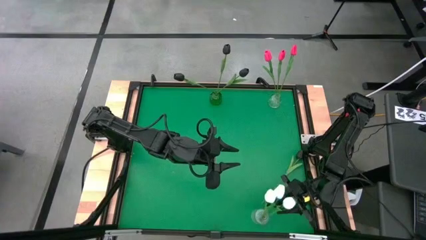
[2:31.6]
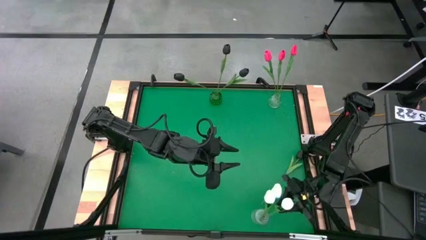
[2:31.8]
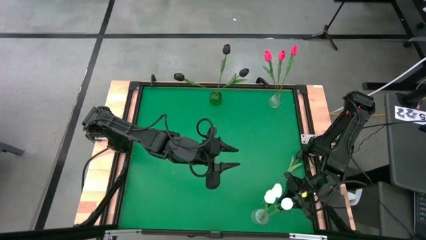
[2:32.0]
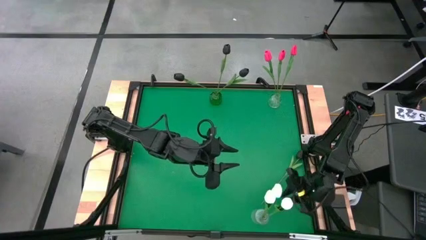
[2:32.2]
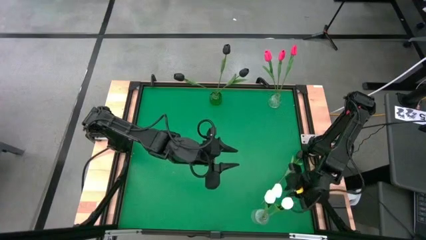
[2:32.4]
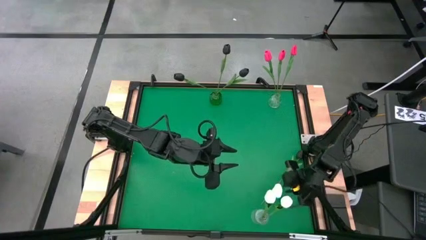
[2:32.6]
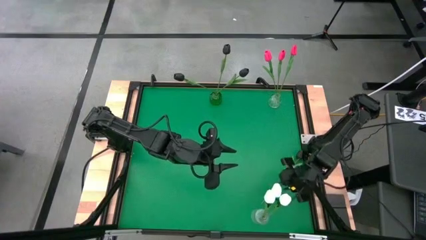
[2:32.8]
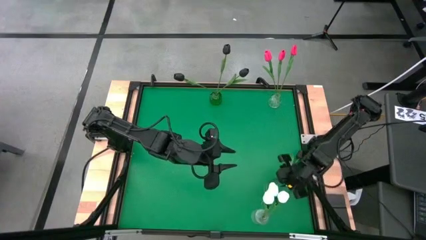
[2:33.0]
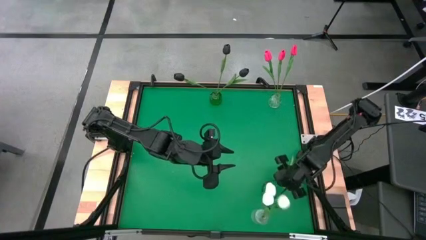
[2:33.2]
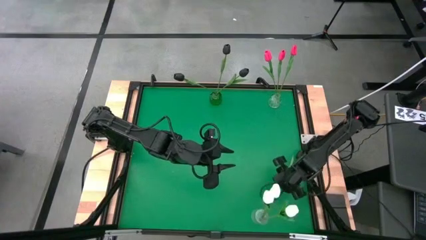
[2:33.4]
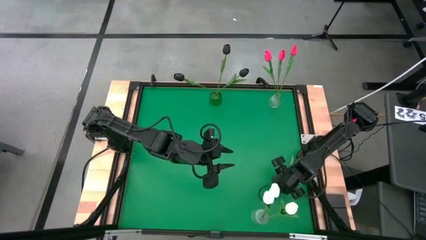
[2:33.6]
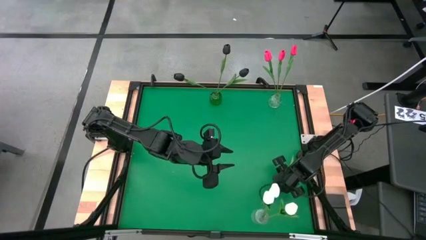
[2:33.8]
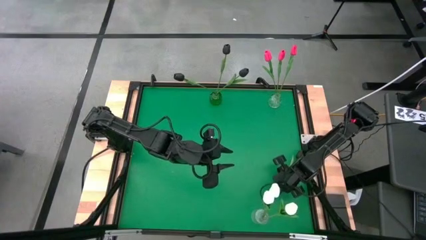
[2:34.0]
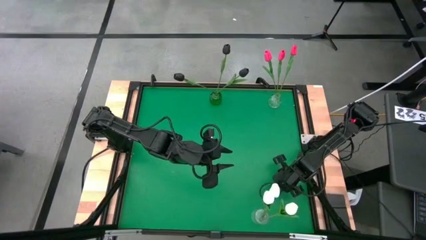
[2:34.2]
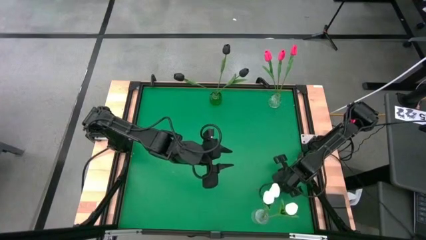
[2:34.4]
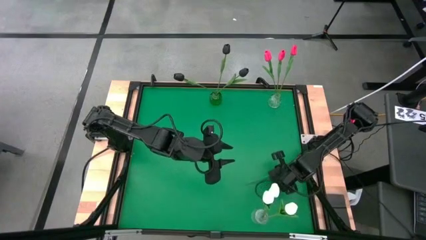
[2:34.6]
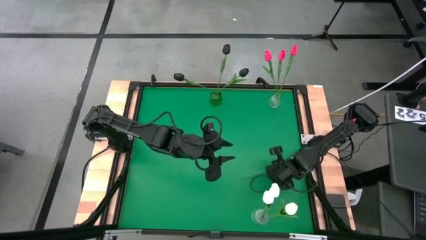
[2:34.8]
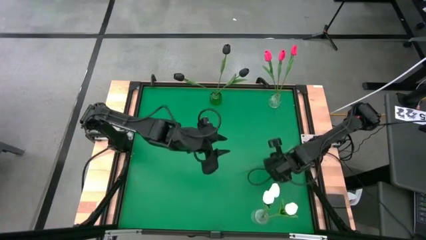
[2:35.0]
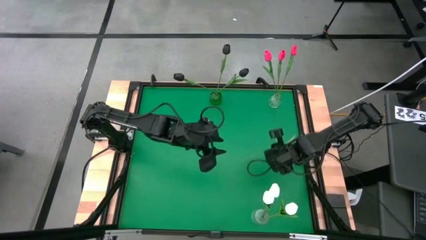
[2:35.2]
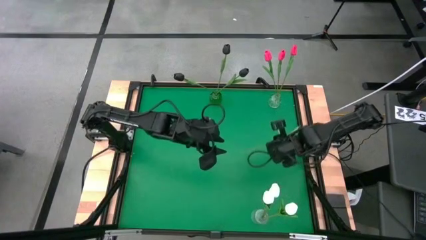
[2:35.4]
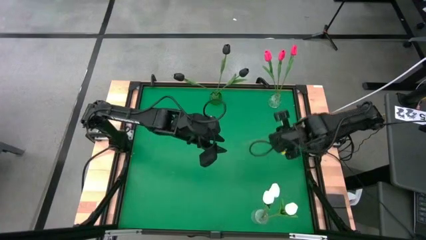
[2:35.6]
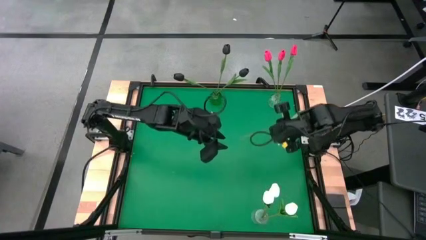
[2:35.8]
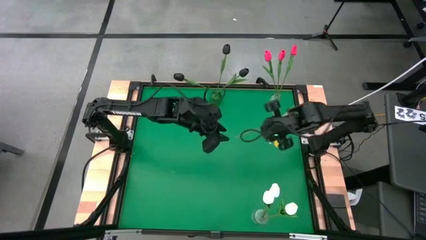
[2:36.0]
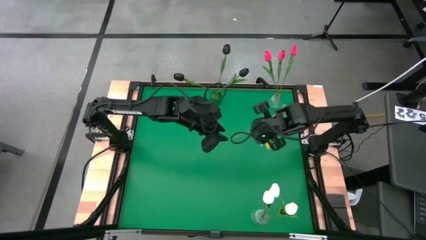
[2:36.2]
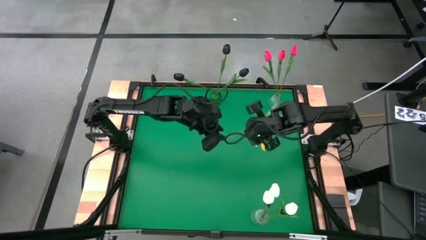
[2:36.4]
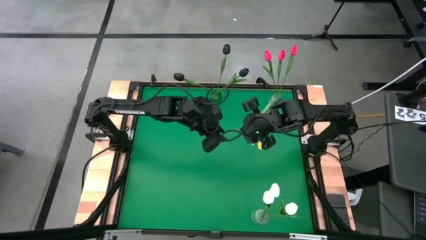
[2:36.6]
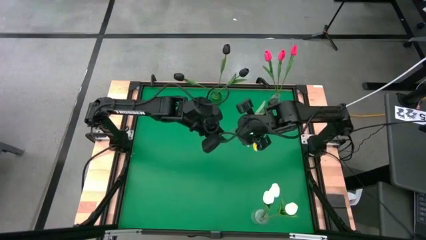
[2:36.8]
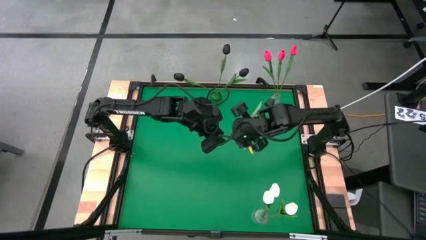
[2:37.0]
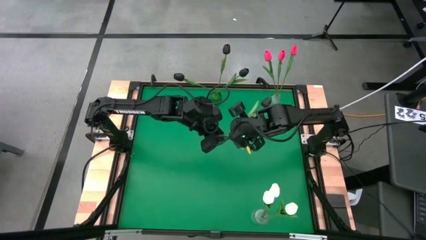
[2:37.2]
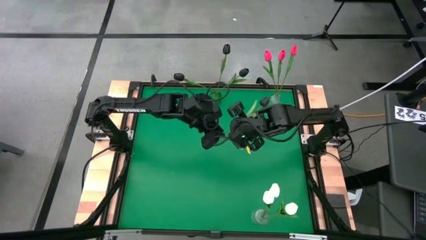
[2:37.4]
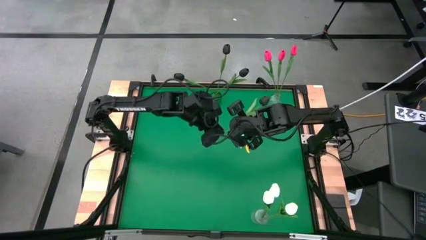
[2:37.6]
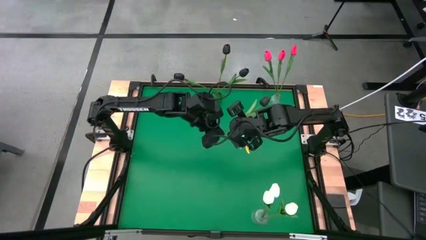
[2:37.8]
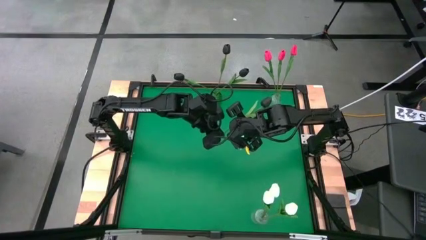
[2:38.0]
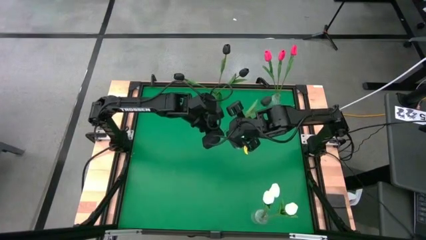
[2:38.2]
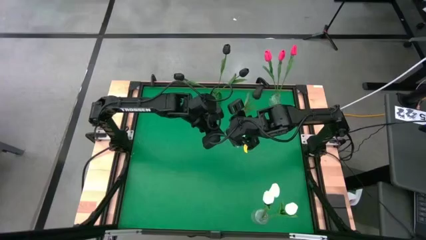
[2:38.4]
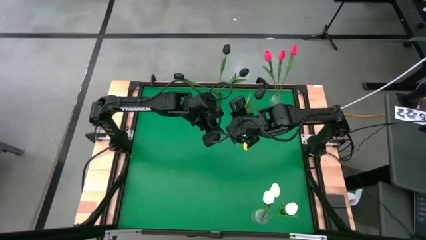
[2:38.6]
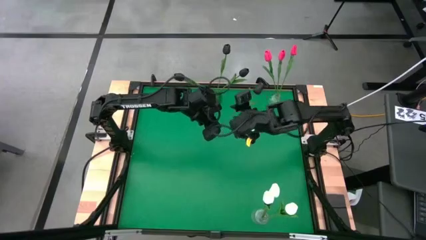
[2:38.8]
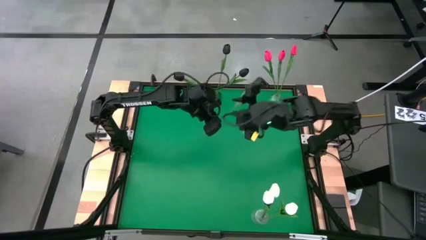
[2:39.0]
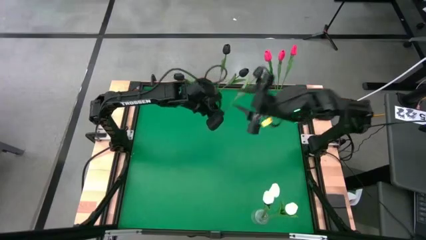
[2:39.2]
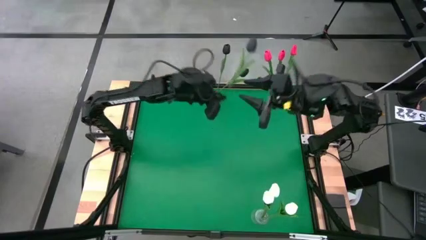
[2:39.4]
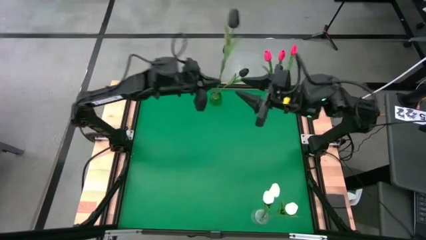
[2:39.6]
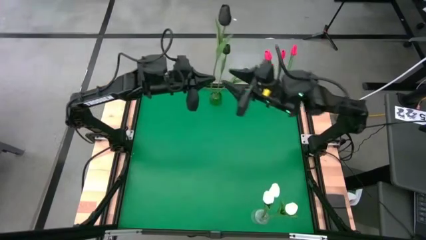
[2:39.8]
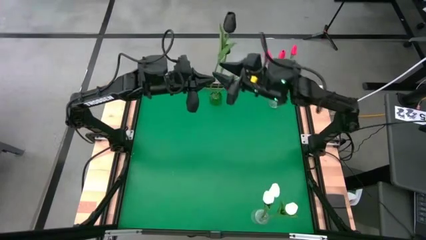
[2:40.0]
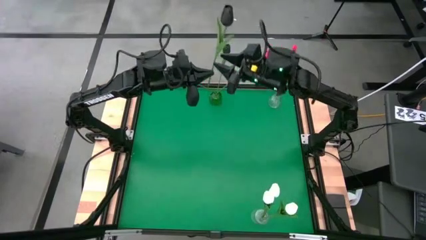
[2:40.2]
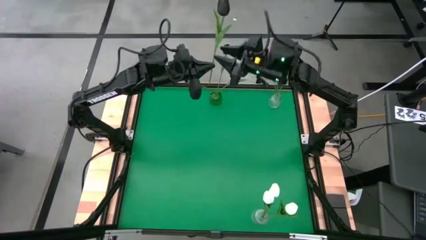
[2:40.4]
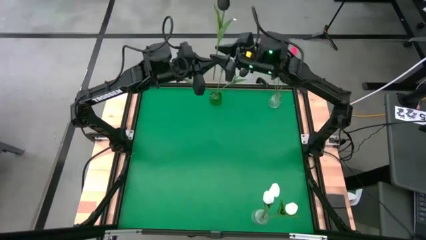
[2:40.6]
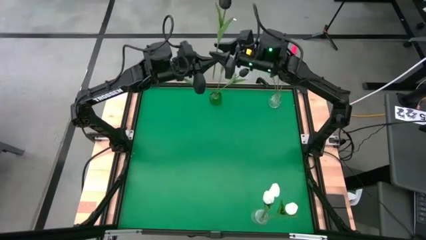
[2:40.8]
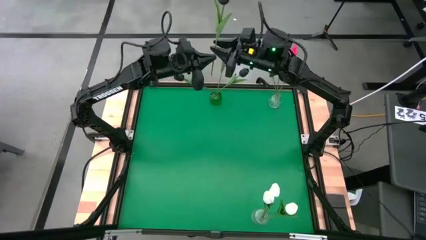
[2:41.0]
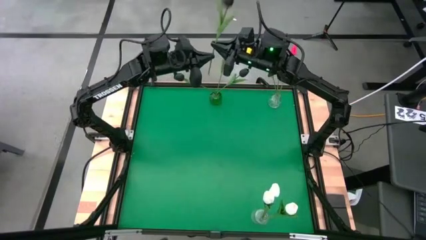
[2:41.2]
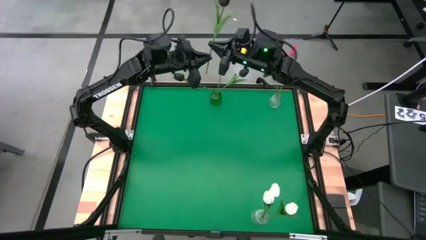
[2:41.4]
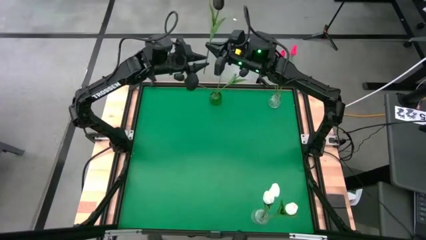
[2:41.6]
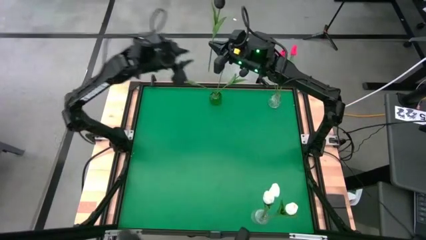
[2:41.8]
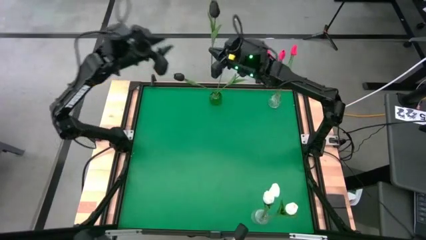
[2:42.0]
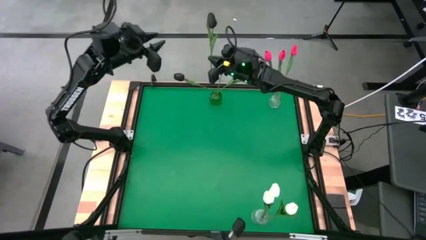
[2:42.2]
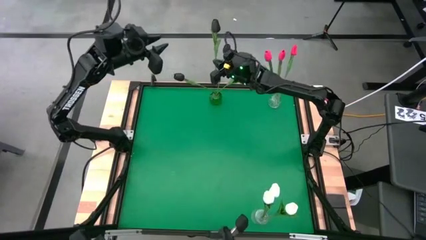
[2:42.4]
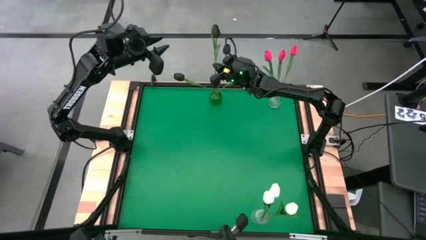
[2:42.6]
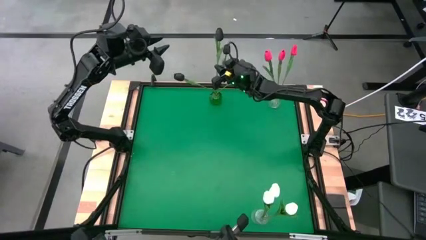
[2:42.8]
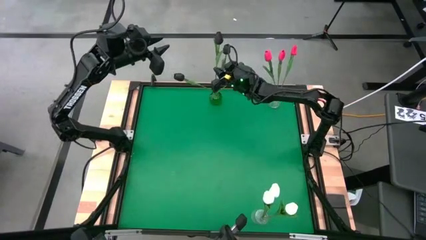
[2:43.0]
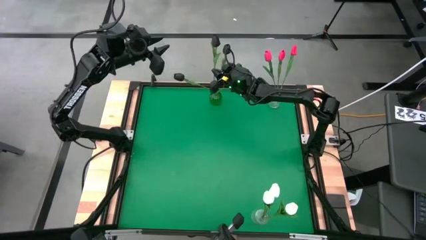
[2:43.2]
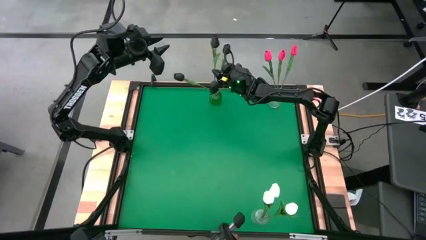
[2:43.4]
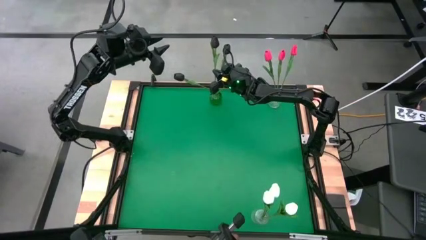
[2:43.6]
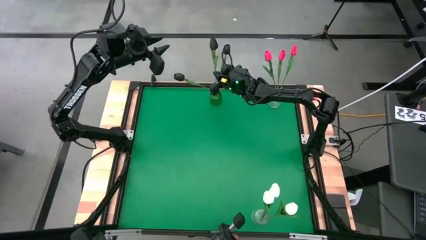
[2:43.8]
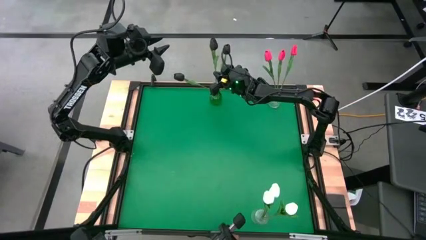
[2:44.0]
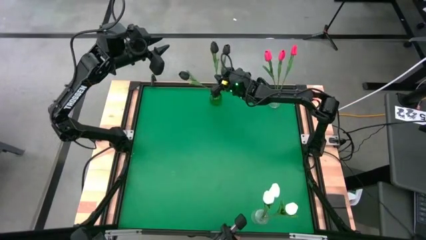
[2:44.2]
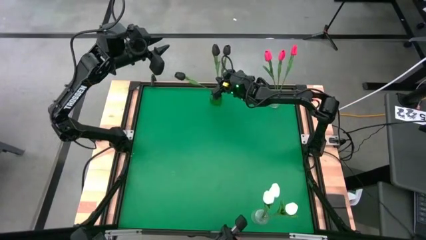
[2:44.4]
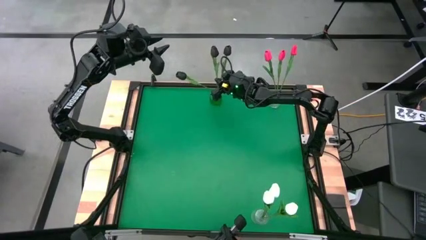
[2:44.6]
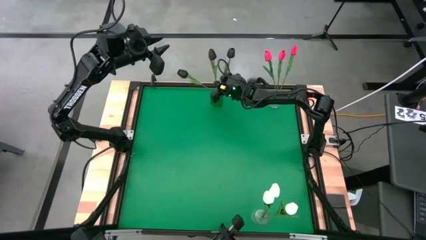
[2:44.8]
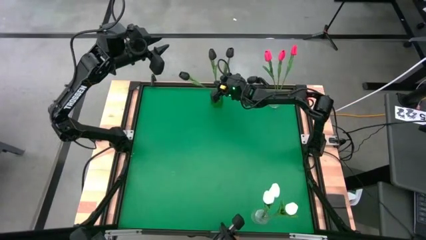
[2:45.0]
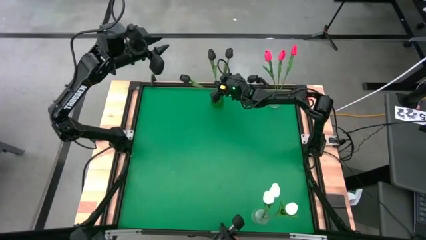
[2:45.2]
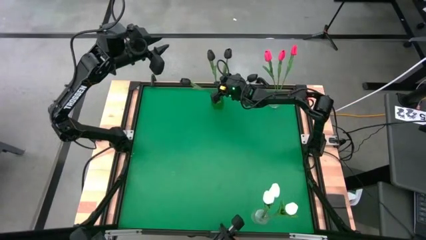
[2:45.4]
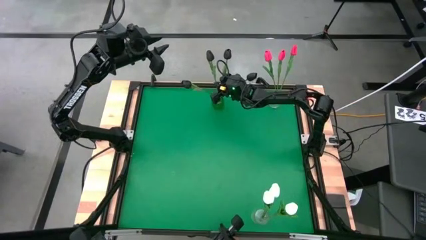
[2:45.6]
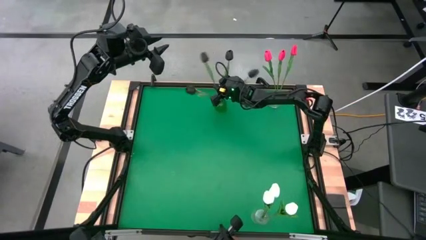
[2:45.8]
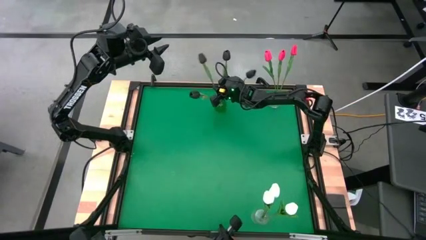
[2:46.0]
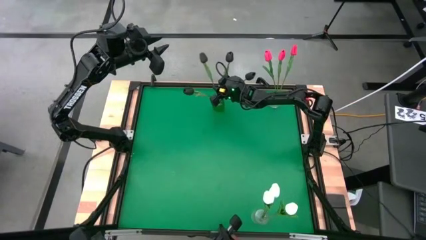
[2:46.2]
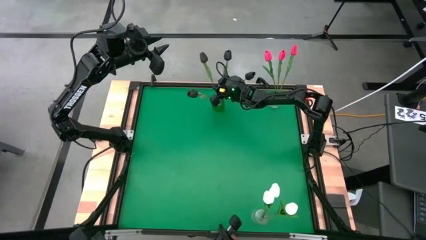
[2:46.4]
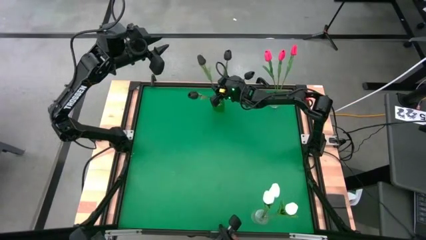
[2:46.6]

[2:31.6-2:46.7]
Task: Sort flowers into vase by color
Put the black tulip into the green vase
